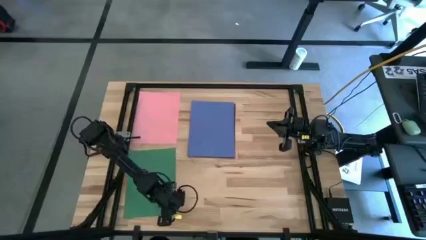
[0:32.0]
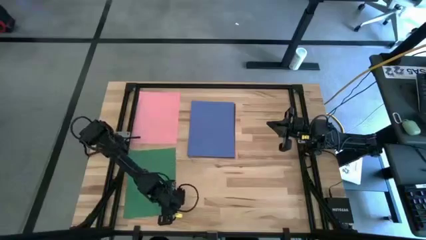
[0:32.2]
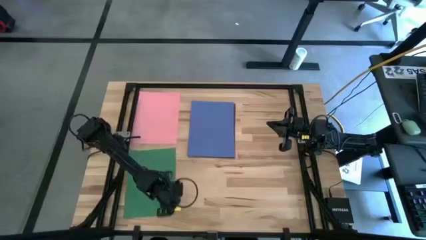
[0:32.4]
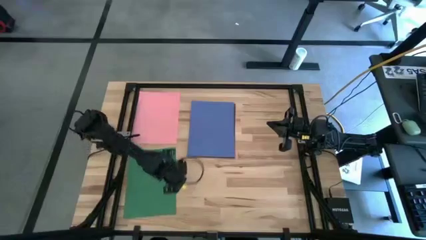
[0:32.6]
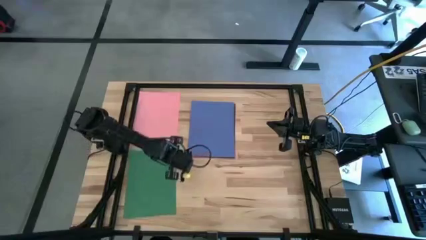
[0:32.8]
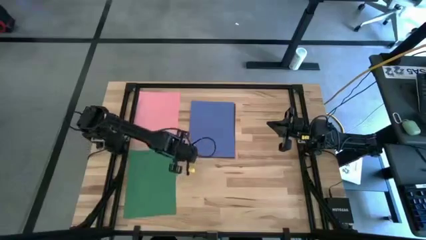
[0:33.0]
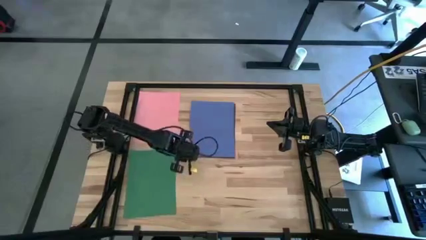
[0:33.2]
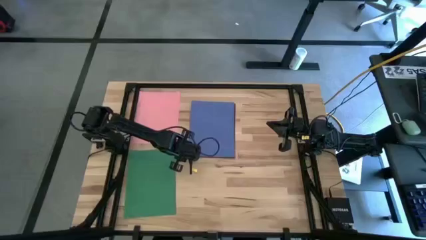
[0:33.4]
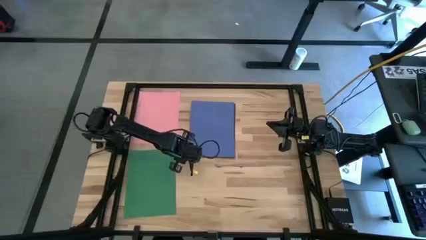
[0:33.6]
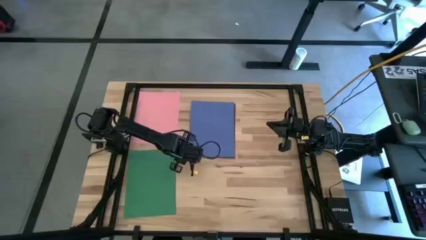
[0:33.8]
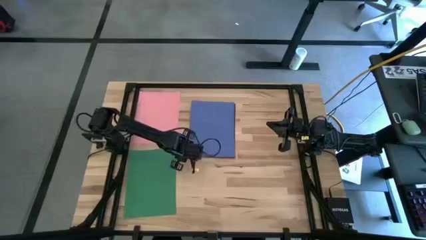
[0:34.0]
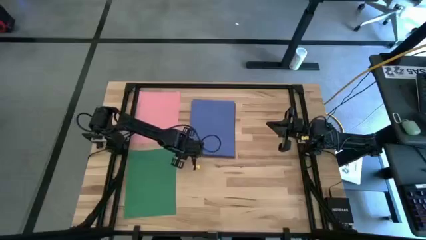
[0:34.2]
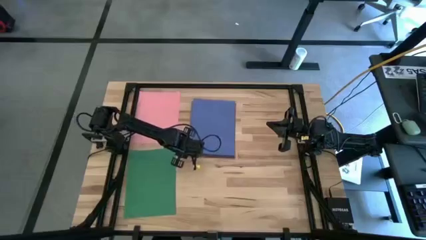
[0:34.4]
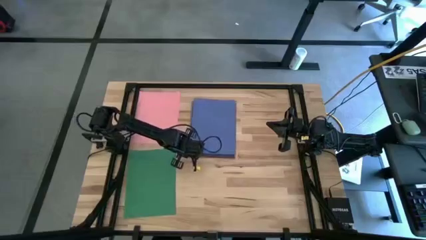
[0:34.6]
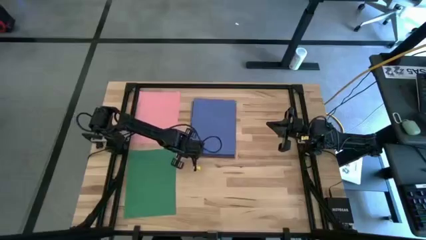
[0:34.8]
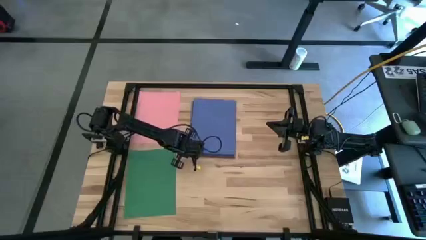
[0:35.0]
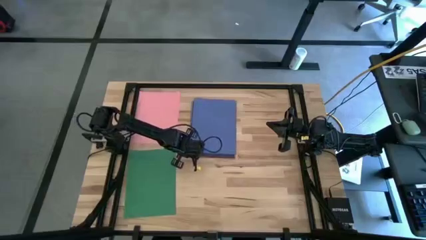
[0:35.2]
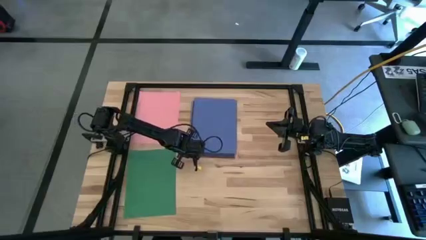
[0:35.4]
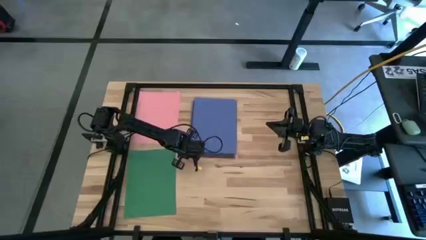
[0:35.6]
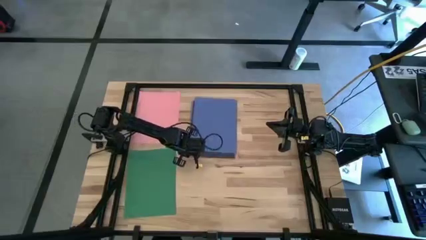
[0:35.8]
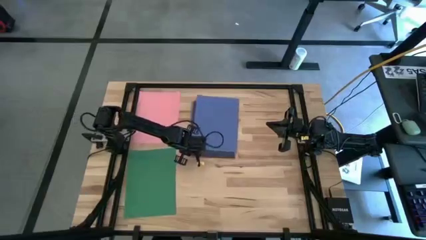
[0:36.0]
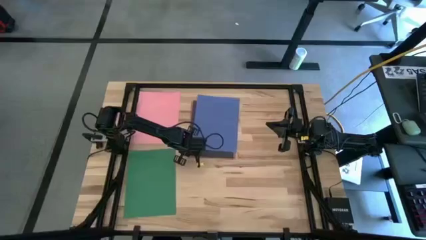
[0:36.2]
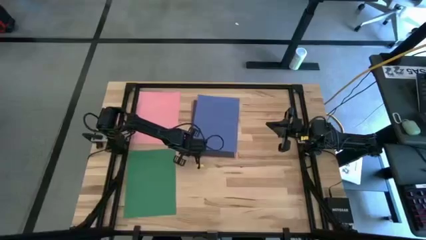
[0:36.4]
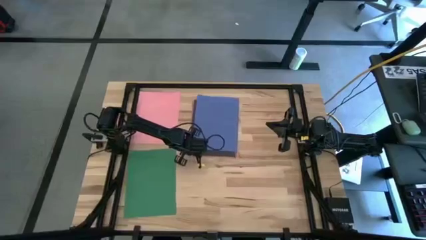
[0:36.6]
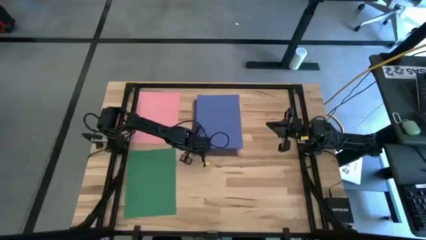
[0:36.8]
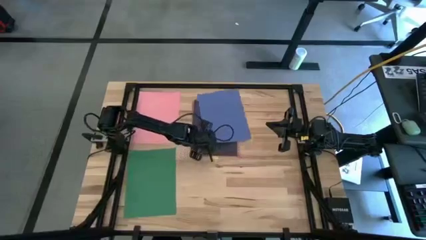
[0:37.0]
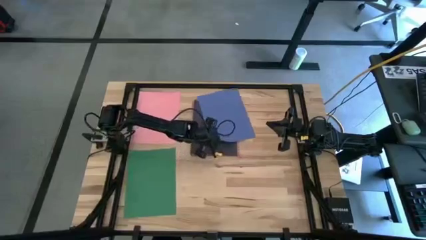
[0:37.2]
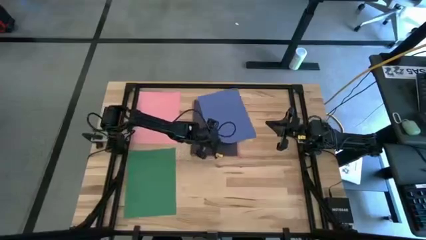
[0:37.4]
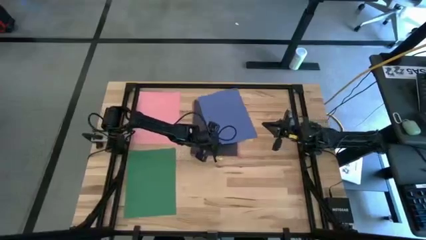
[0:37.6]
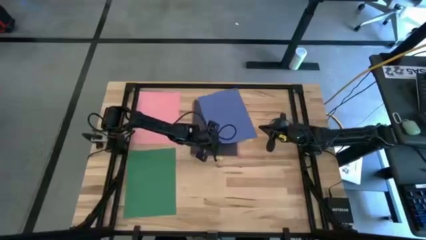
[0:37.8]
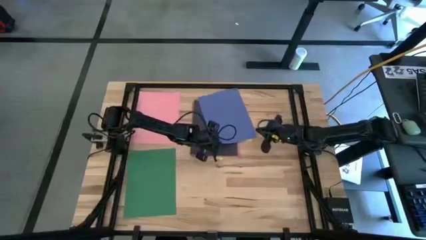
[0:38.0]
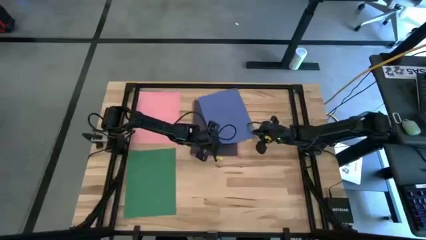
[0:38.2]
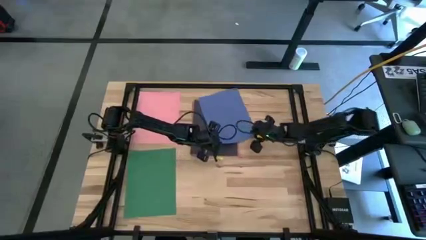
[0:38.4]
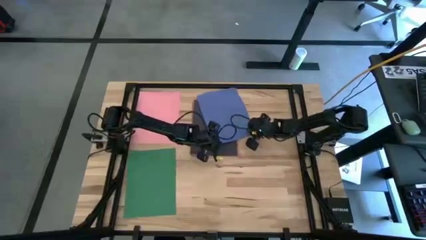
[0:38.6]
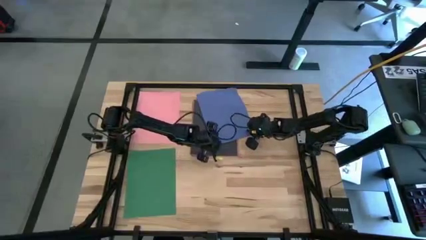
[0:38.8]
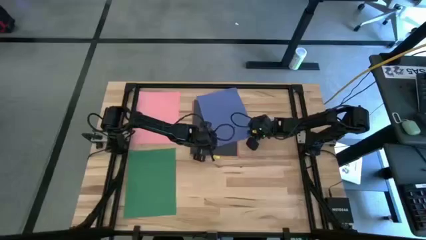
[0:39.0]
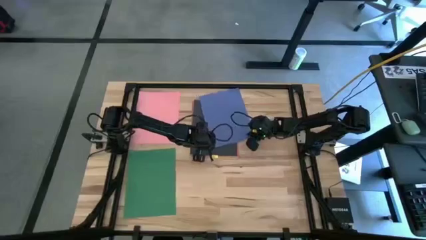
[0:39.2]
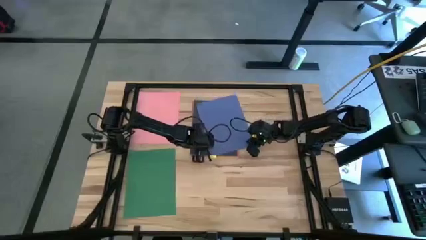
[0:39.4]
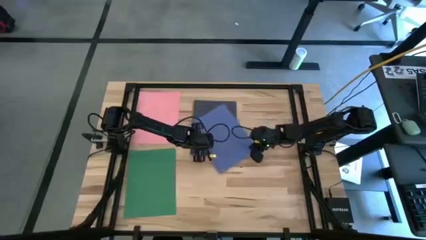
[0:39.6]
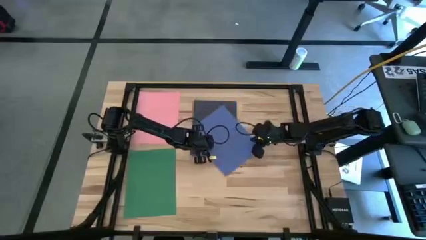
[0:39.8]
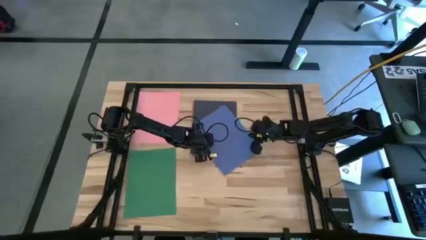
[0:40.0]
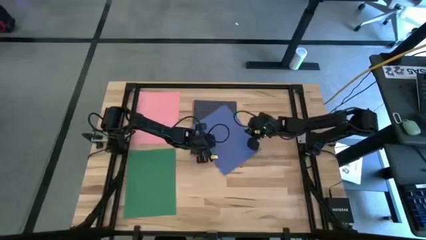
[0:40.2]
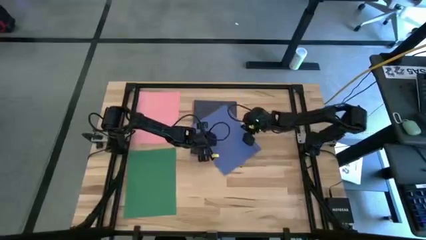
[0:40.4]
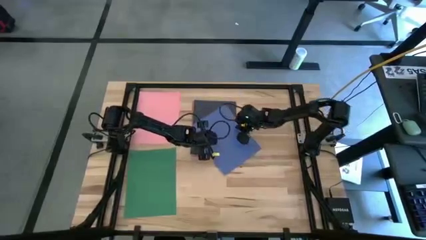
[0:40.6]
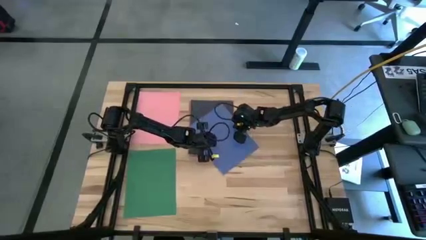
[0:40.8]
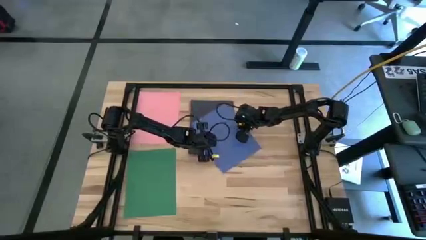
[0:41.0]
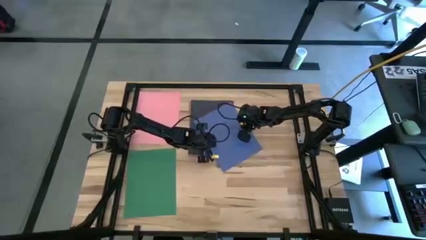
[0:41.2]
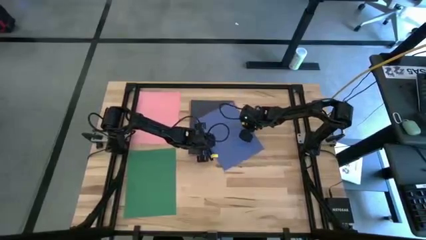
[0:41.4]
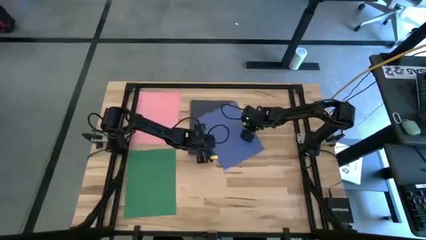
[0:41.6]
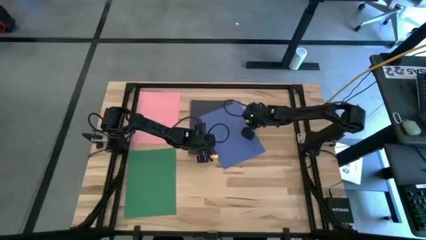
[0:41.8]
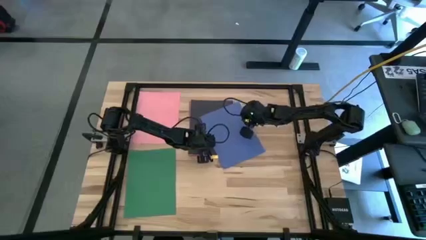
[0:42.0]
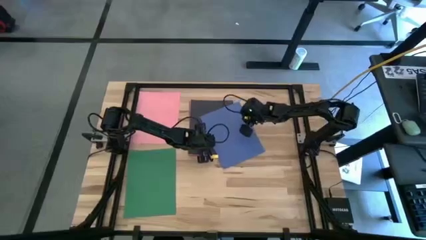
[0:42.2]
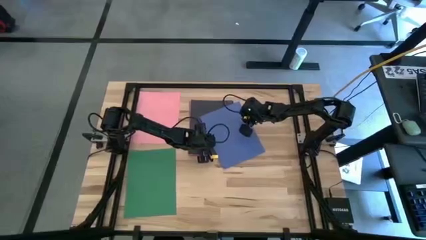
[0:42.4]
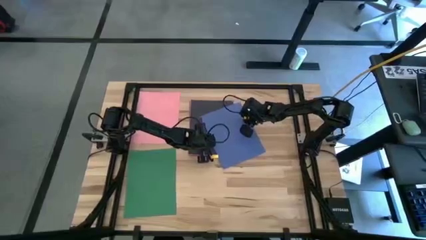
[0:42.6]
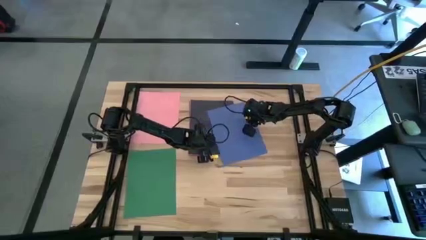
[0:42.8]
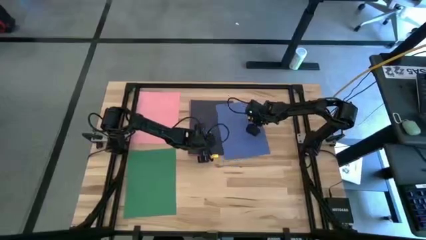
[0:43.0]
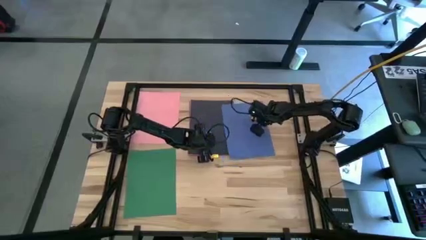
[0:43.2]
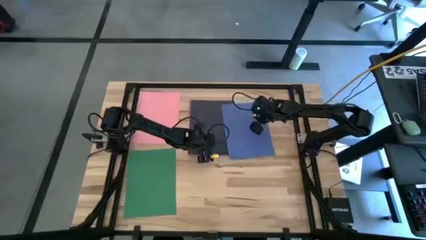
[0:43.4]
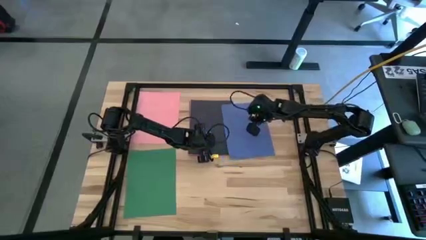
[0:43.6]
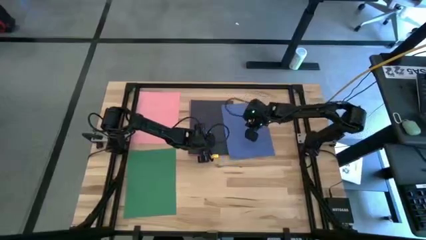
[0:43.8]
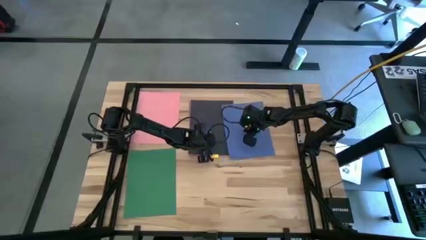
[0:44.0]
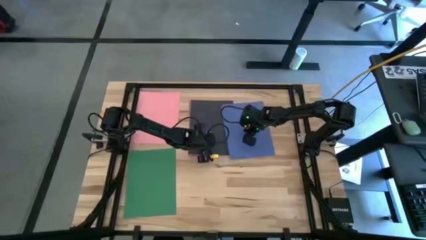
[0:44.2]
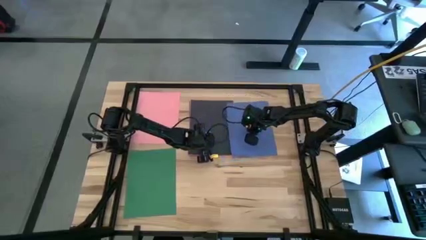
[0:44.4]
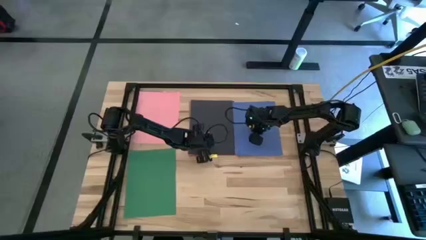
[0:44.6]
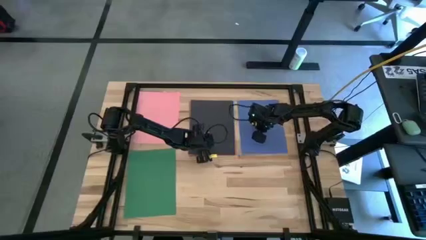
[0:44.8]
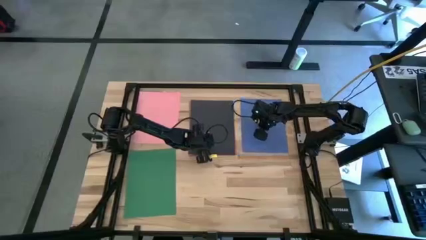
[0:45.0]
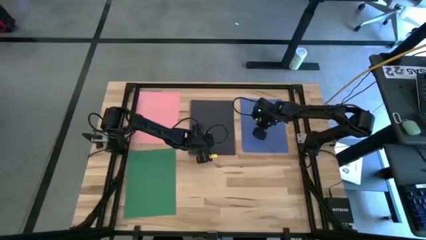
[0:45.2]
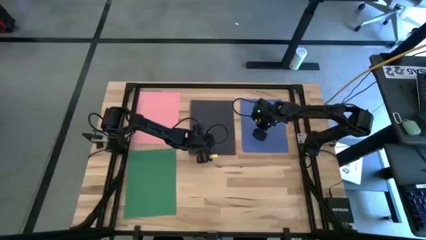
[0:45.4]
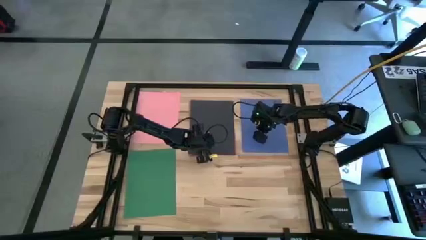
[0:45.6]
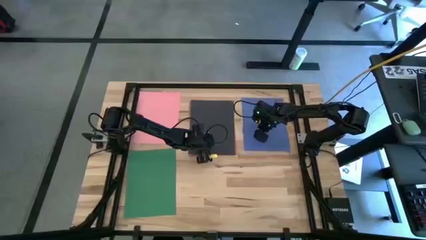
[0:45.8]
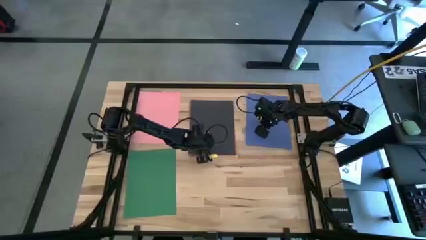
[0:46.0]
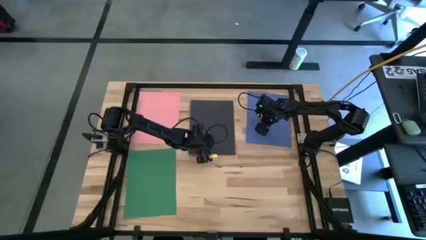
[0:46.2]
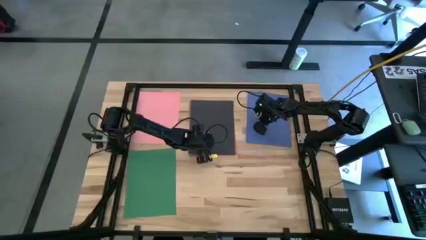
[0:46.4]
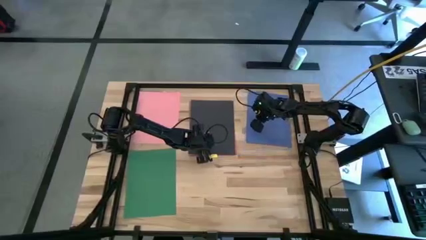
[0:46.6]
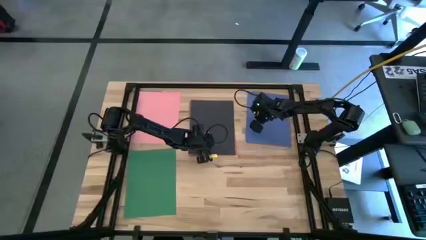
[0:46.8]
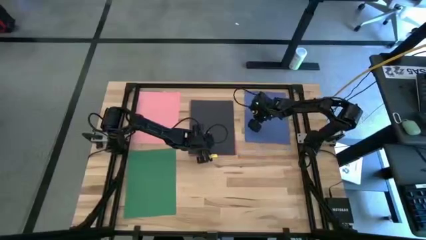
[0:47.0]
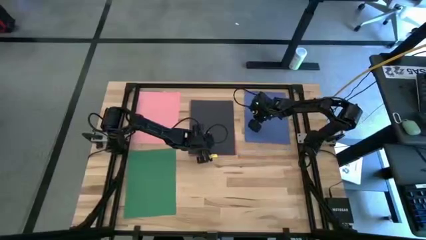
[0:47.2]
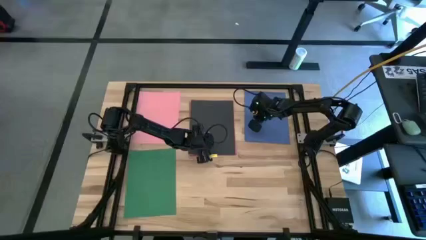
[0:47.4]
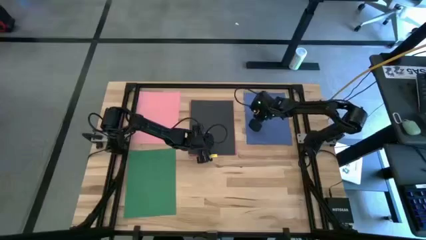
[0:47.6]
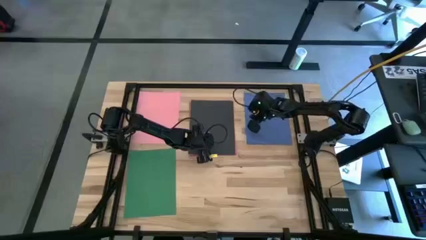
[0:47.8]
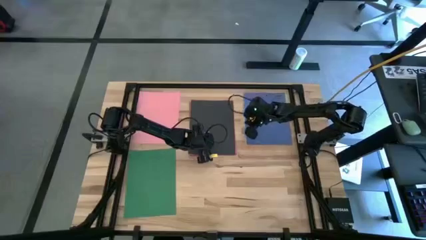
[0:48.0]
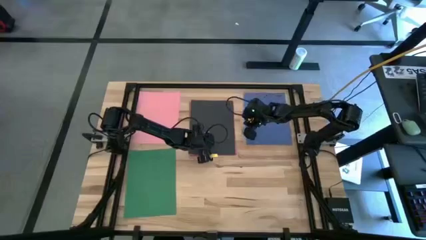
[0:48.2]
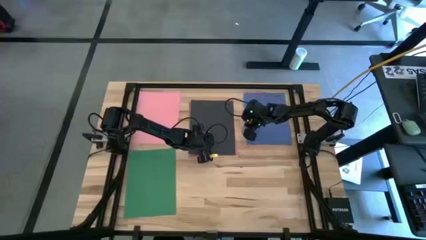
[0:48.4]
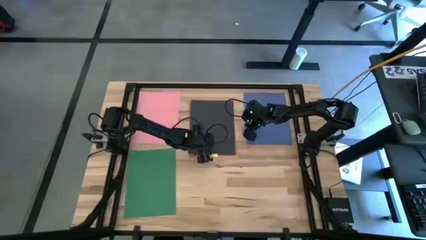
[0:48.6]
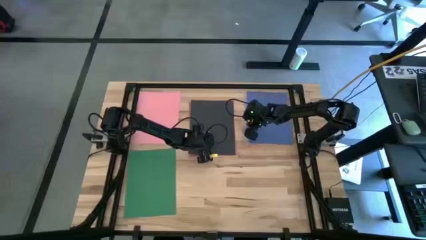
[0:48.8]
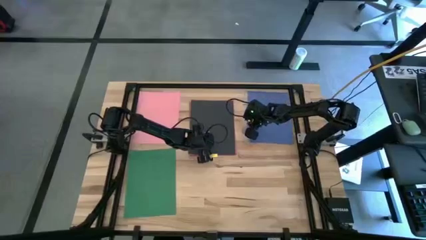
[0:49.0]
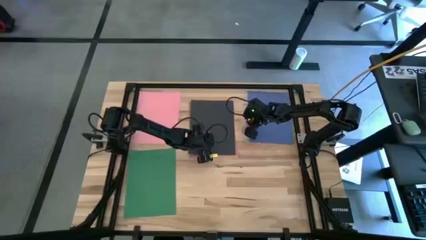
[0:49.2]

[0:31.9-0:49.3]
Task: Organize paper
Move the blue paper to the top right of the table
